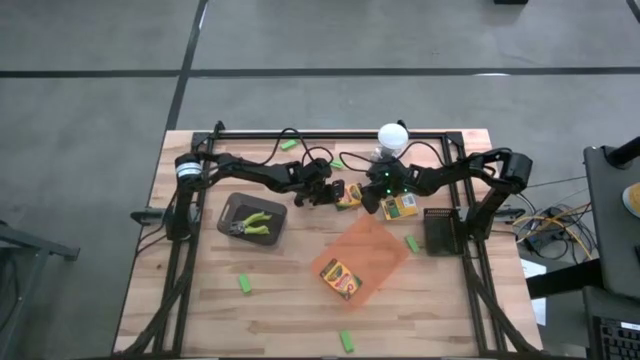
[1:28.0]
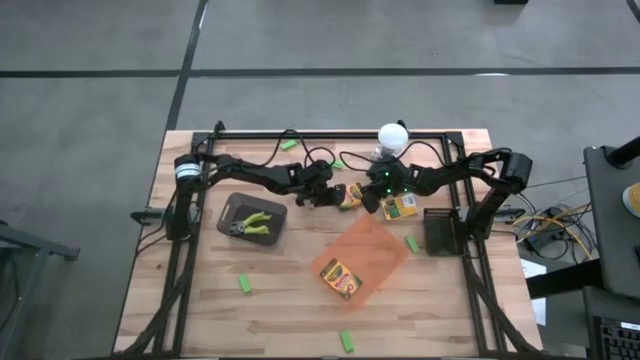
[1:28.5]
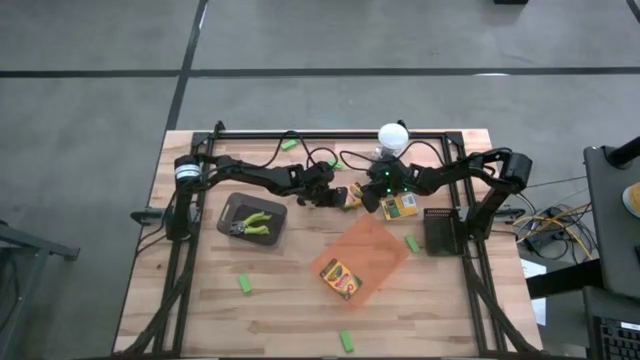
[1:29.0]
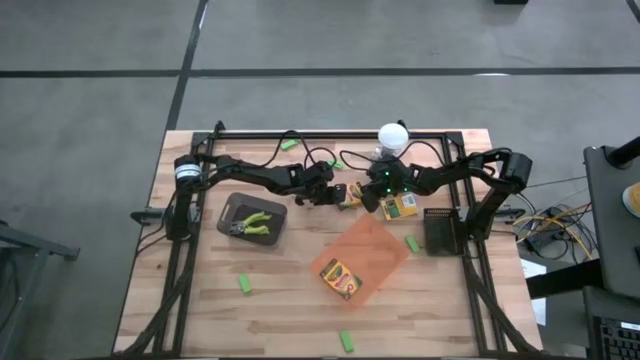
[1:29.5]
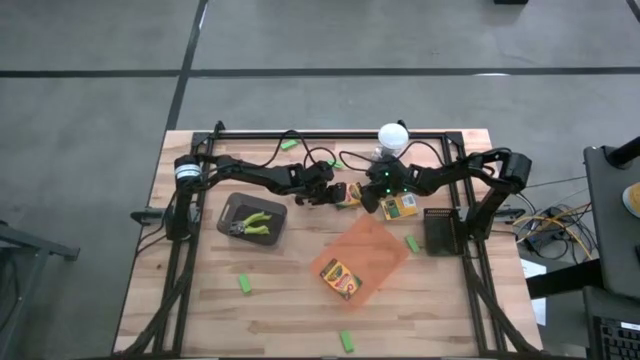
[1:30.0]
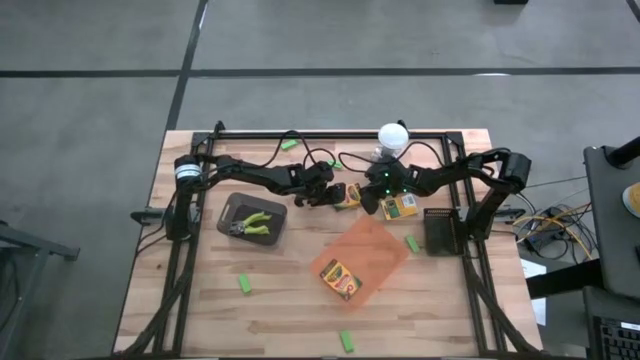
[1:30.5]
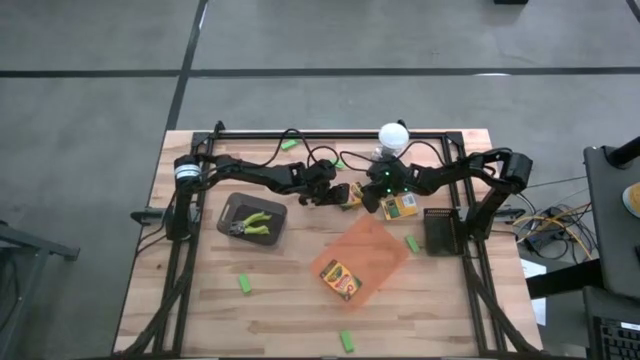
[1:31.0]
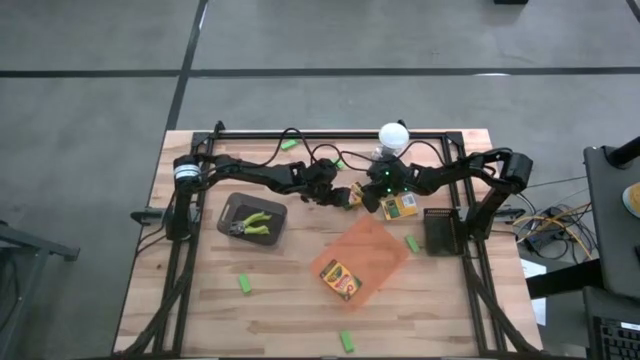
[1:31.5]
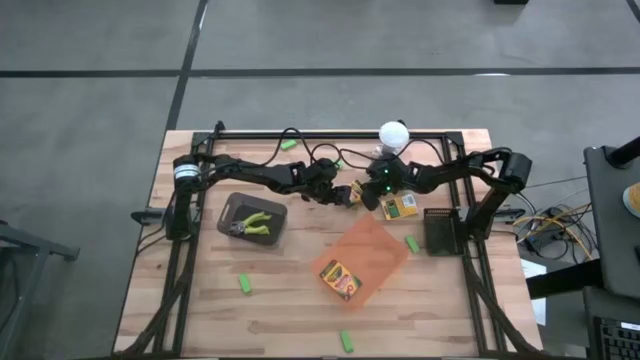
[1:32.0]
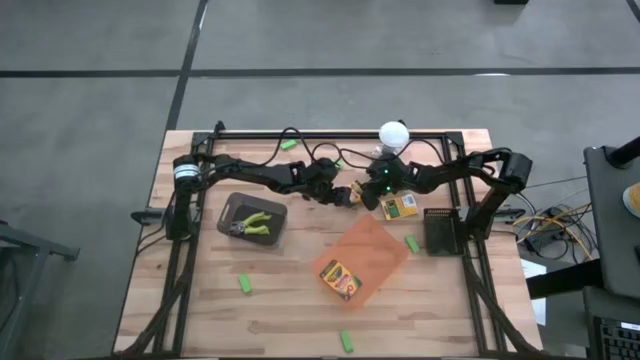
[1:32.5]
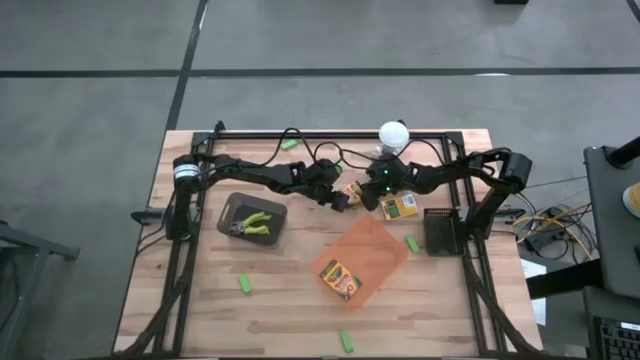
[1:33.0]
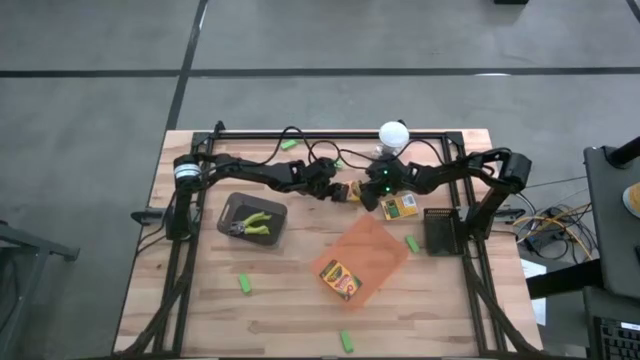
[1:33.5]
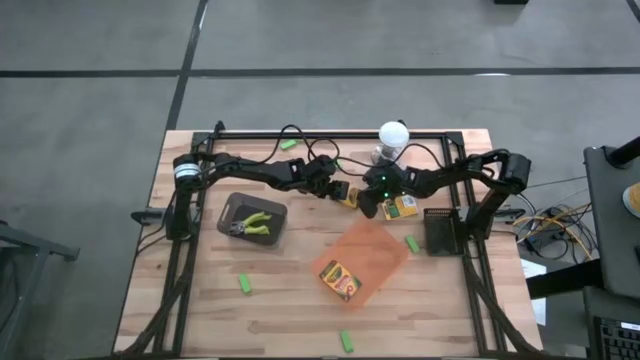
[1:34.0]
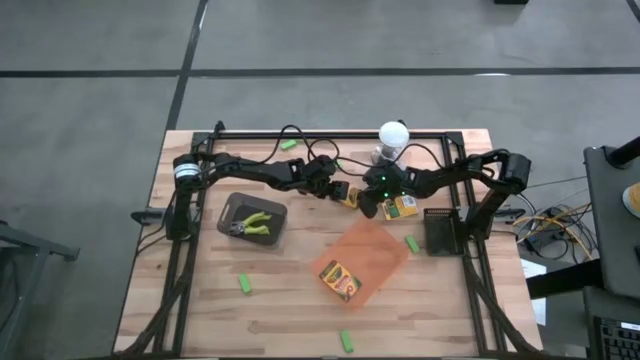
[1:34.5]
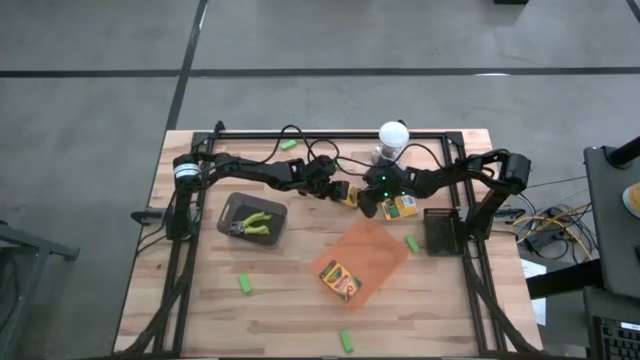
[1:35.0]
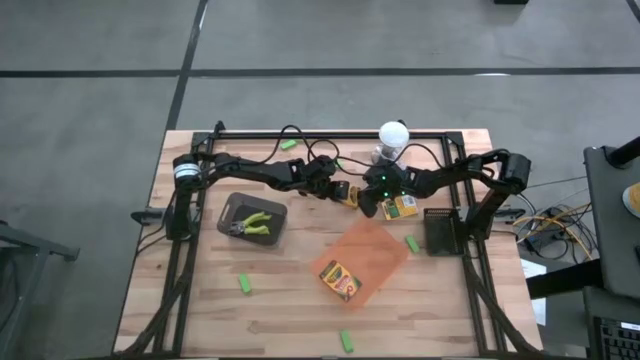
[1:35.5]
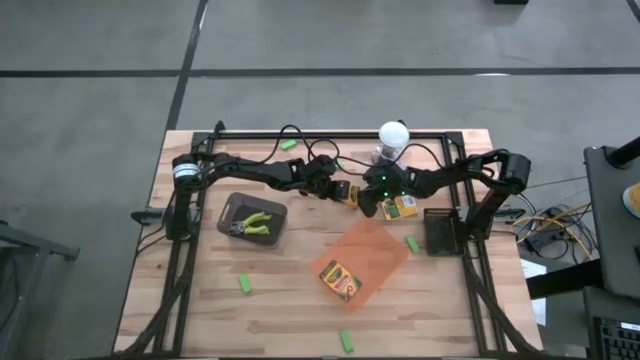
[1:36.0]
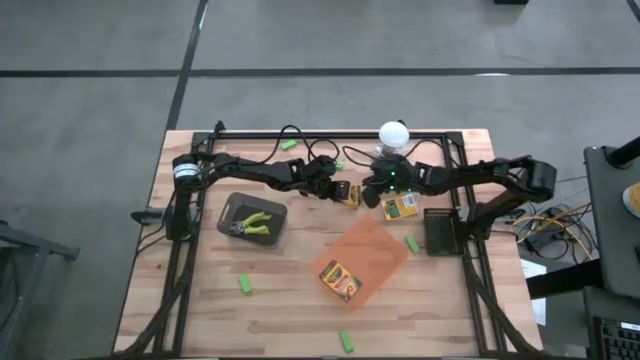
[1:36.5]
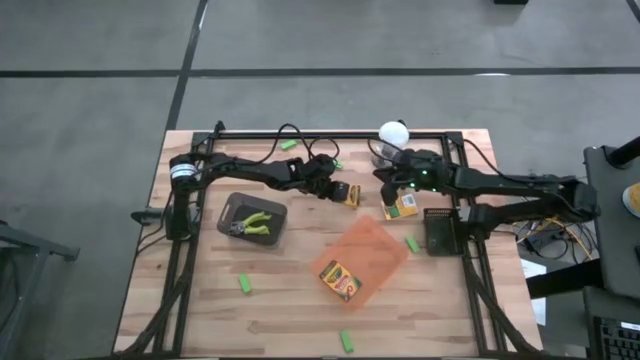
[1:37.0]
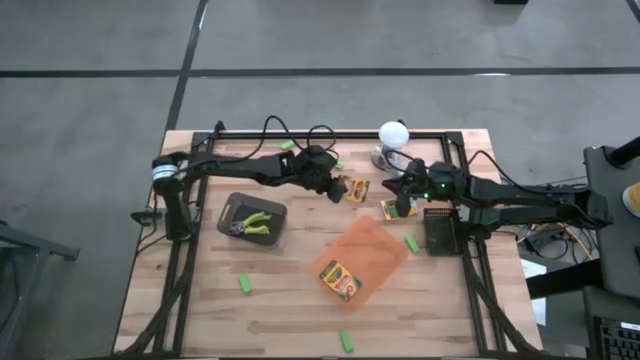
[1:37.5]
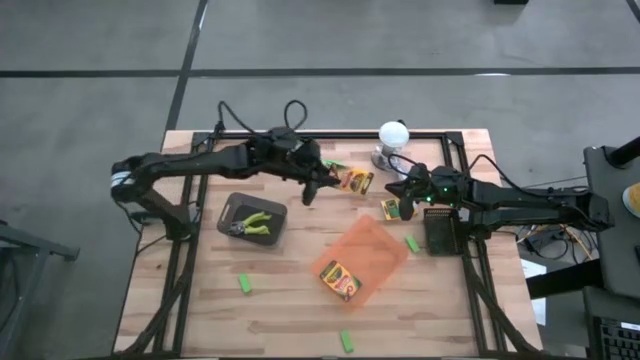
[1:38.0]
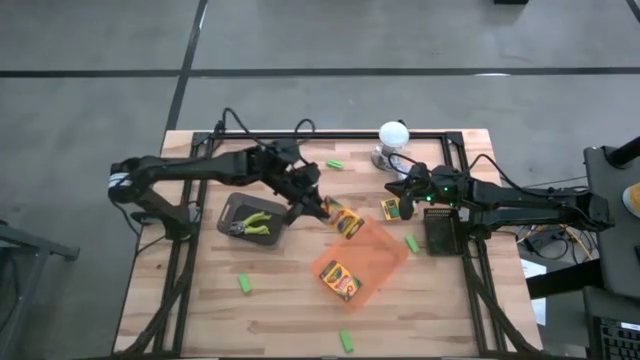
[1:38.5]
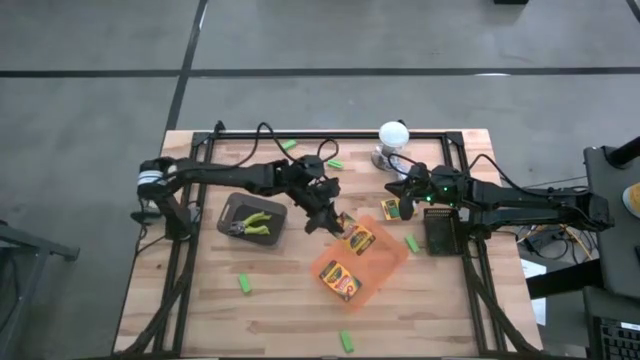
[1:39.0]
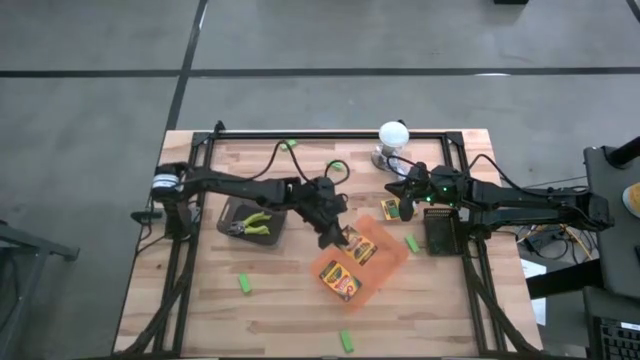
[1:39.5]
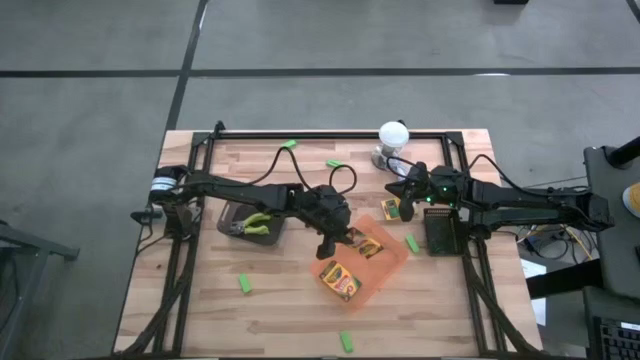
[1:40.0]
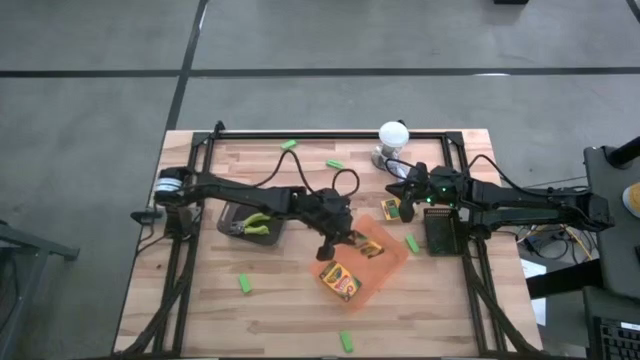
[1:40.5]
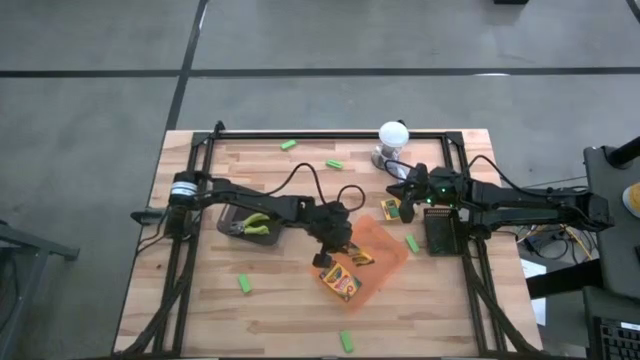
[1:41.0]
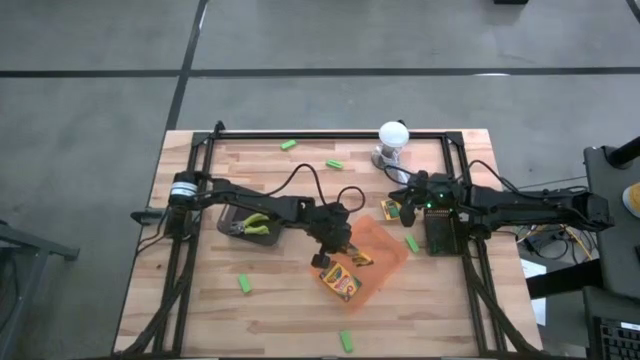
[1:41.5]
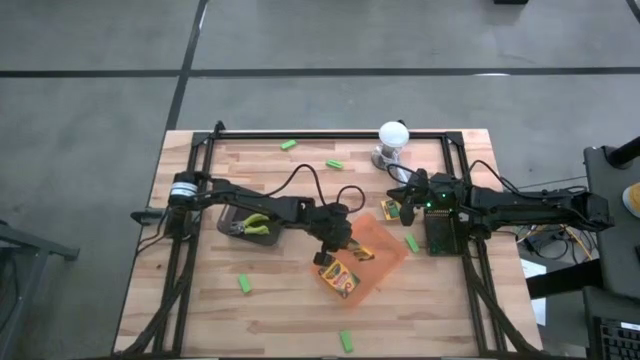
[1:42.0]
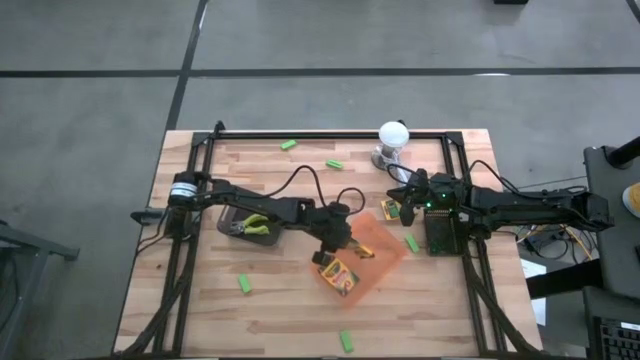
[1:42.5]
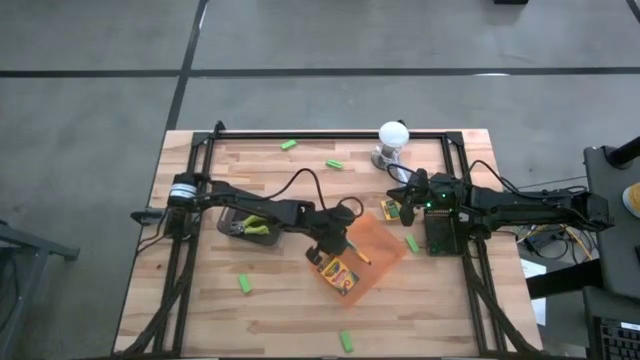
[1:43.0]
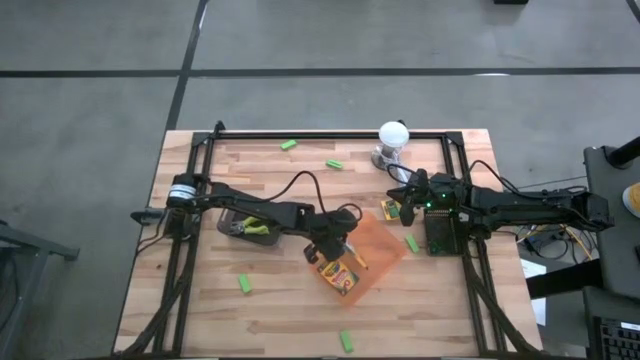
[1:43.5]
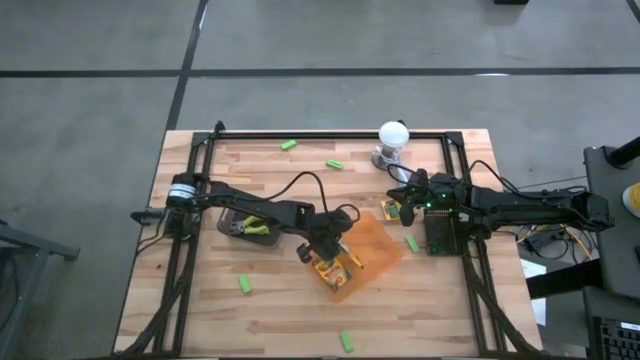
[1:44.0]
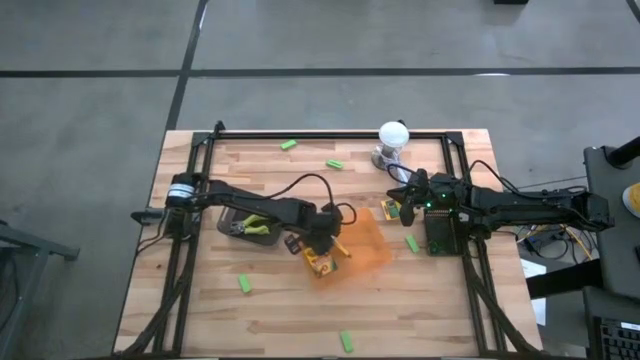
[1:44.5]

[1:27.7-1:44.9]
Task: Pick & Place School Supplies
Put the left crayon box into the orange bin

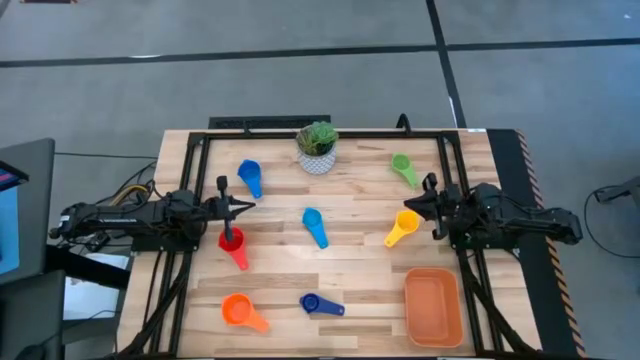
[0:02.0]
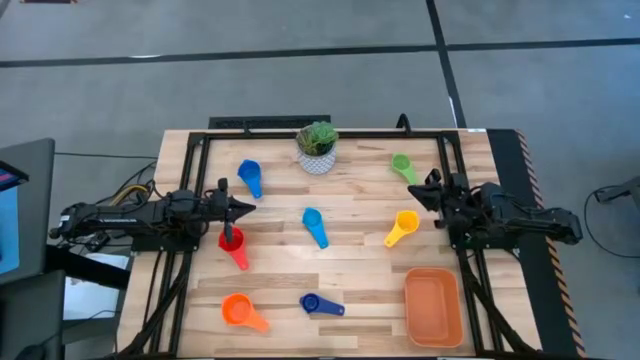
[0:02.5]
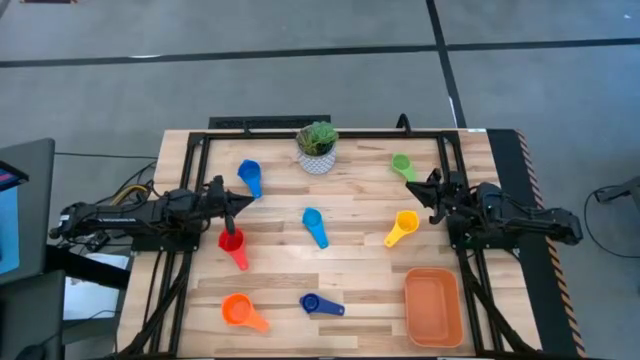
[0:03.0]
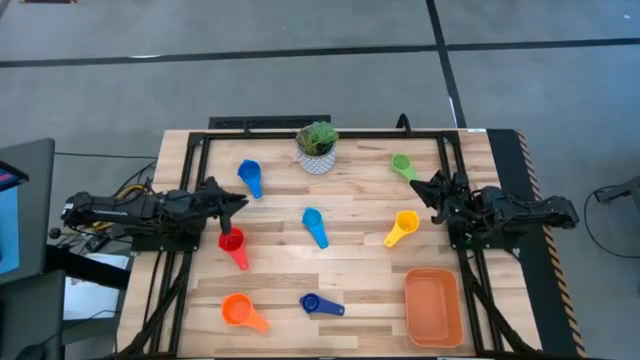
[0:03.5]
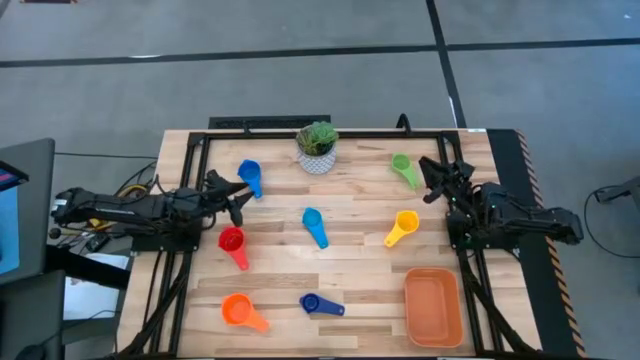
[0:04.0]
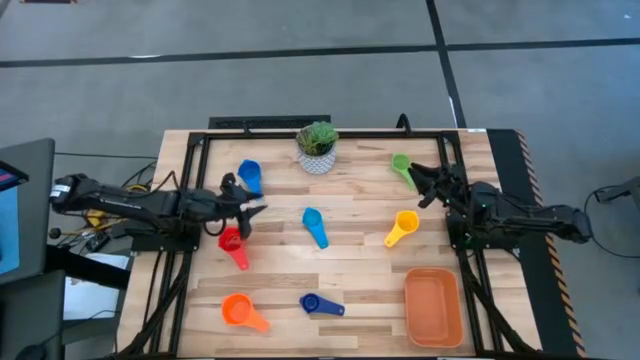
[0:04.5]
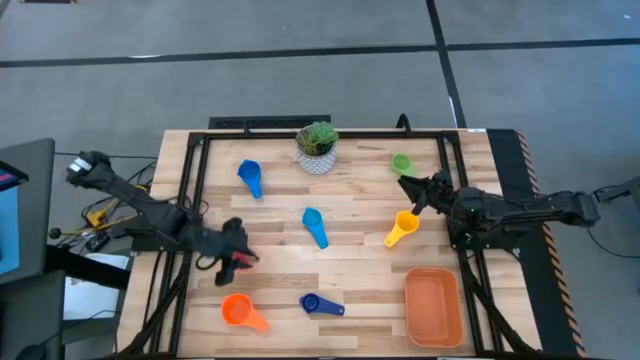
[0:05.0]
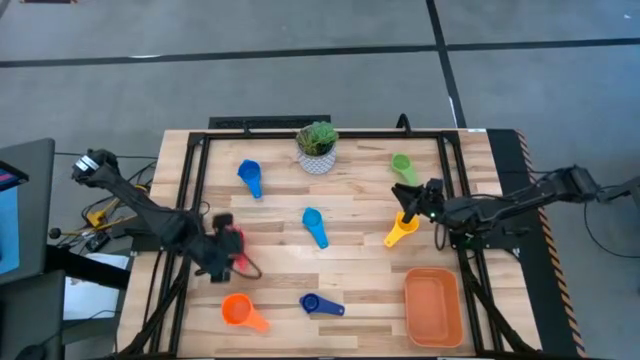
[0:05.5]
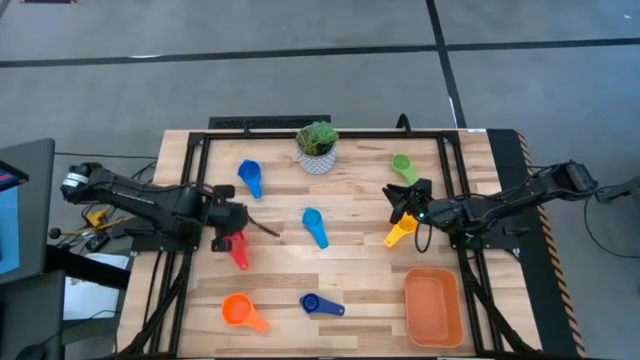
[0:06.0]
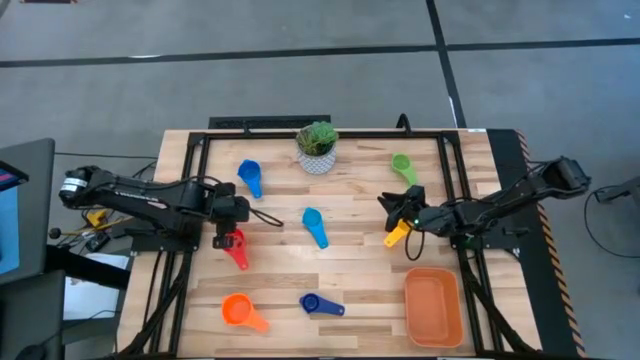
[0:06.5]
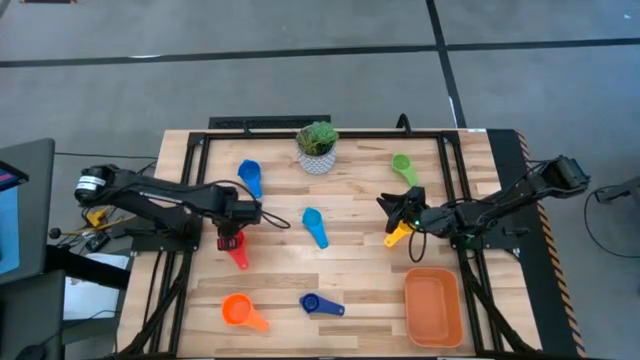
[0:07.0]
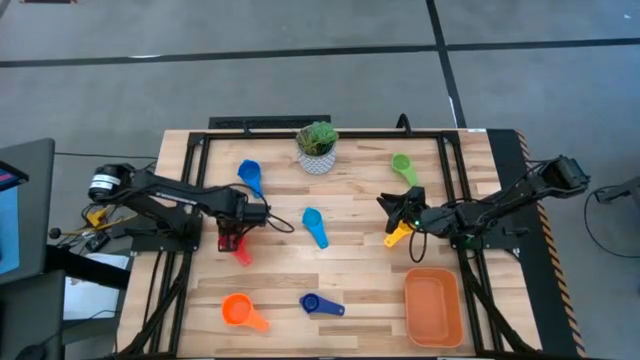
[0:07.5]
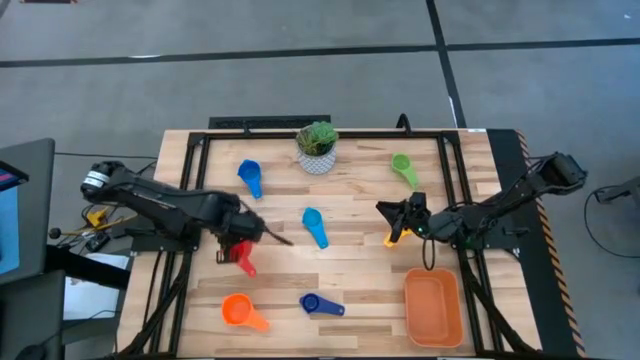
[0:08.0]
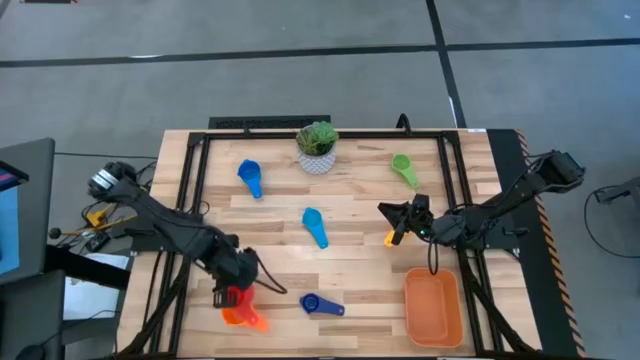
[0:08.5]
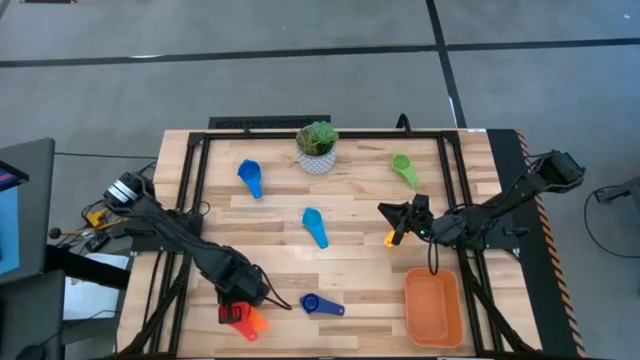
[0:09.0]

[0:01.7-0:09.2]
Task: Nest measuring cups in basket
Stack the red measuring cup on top of the orange measuring cup
